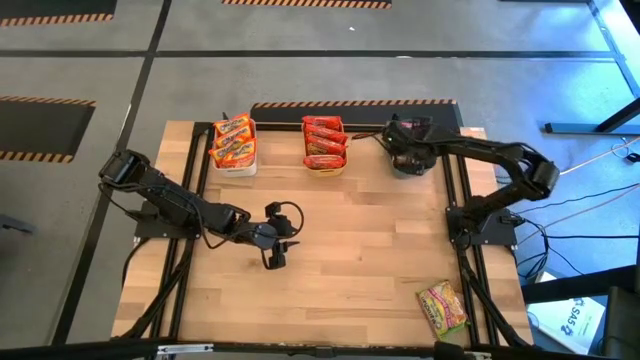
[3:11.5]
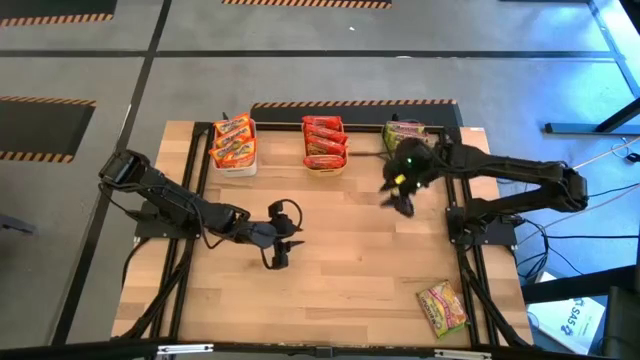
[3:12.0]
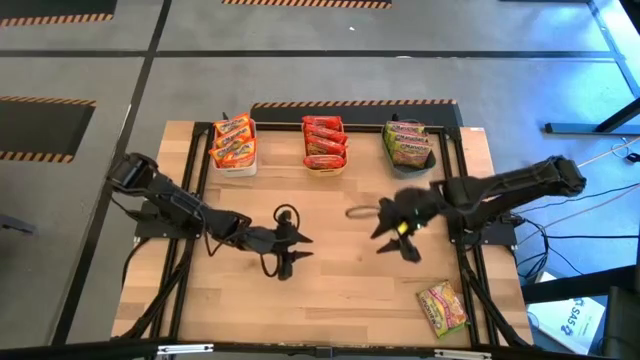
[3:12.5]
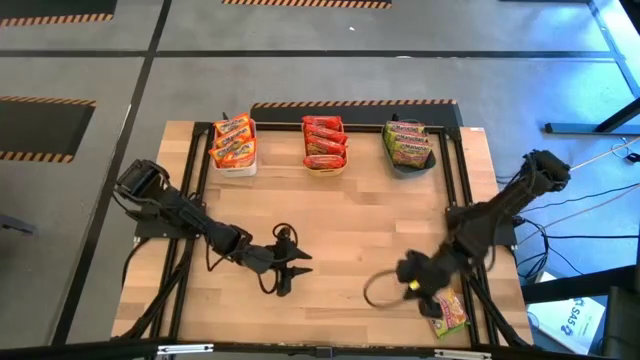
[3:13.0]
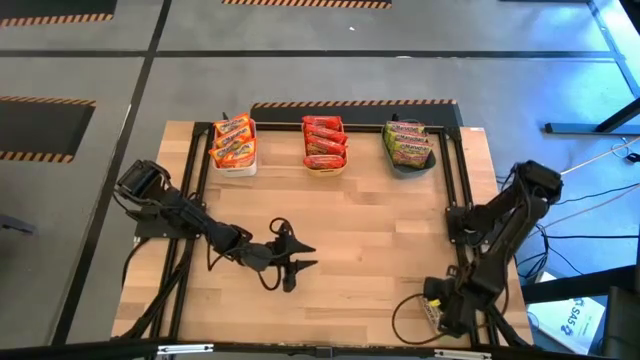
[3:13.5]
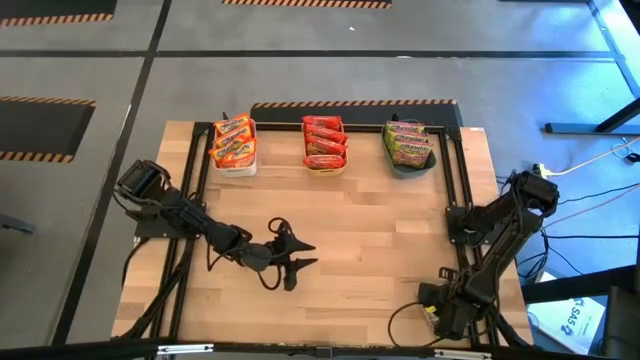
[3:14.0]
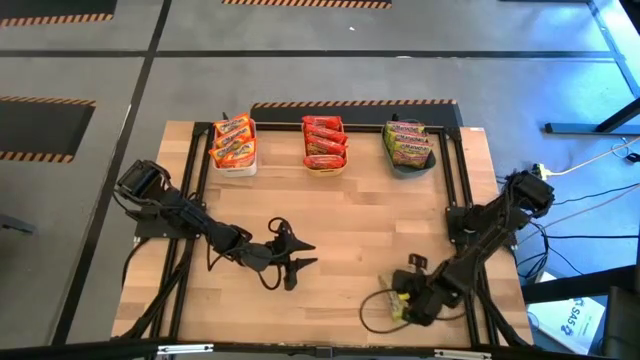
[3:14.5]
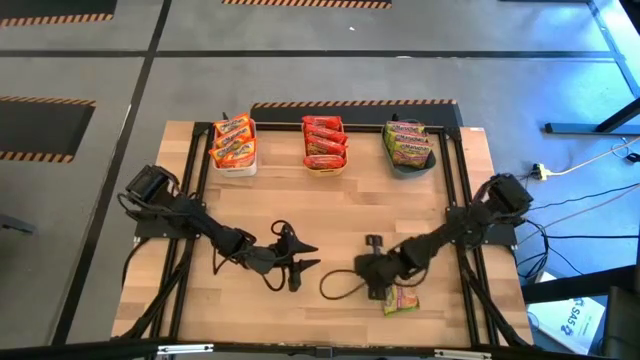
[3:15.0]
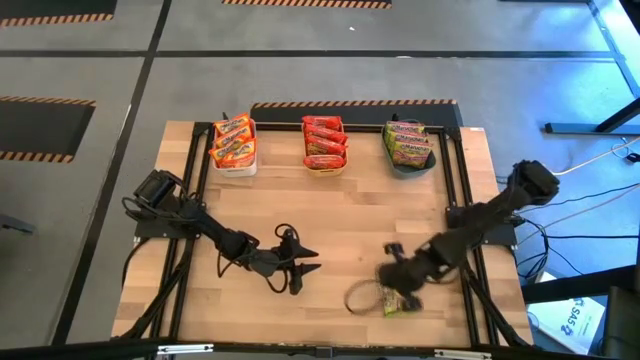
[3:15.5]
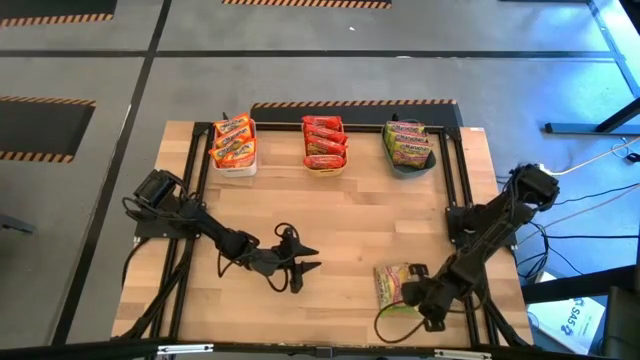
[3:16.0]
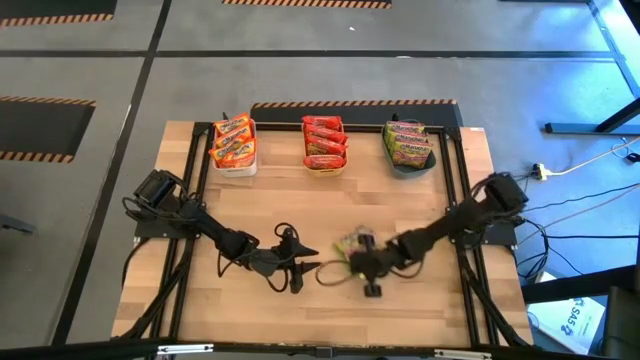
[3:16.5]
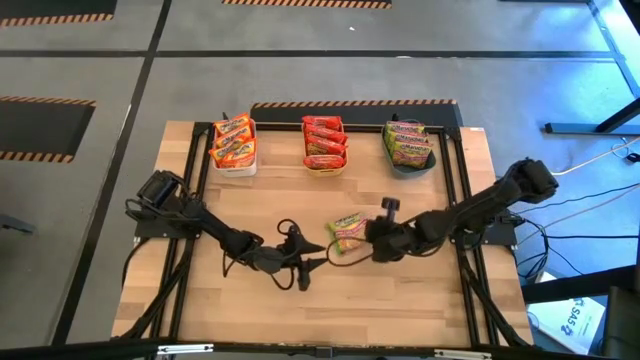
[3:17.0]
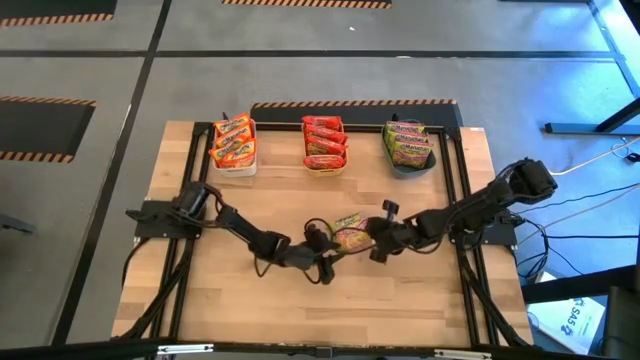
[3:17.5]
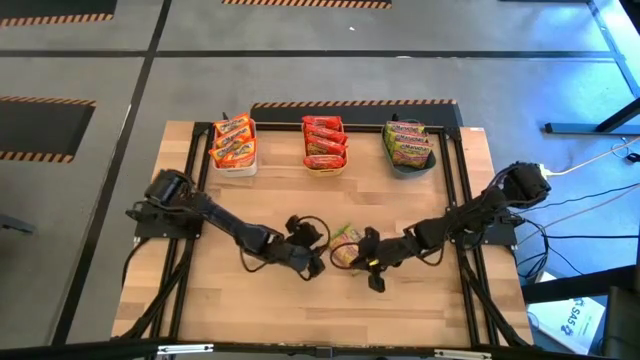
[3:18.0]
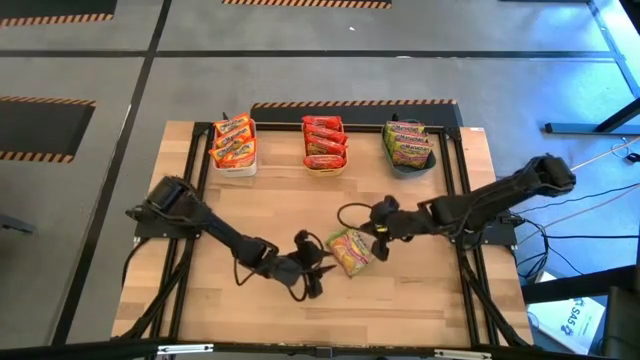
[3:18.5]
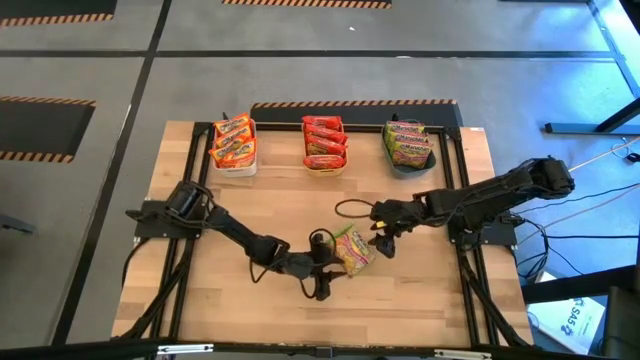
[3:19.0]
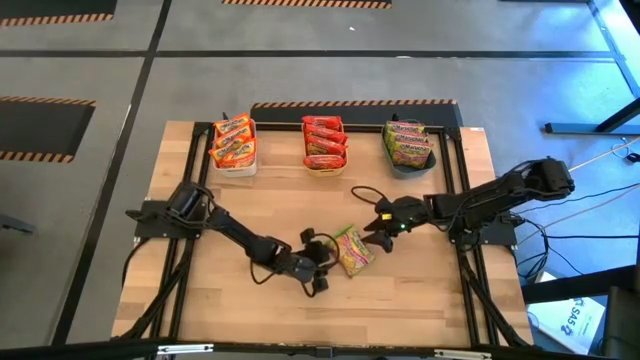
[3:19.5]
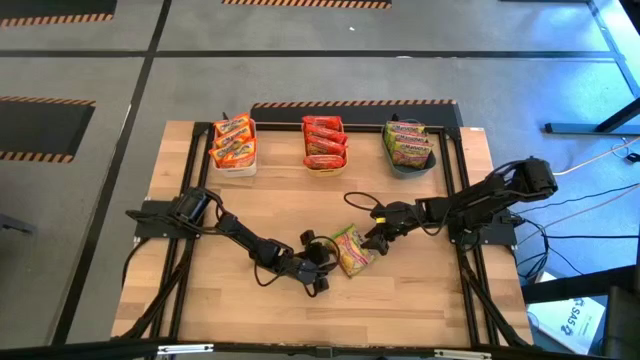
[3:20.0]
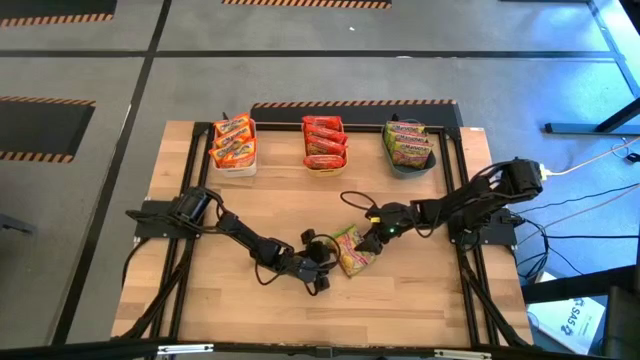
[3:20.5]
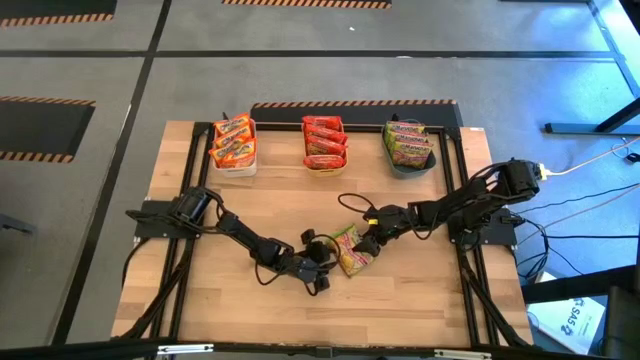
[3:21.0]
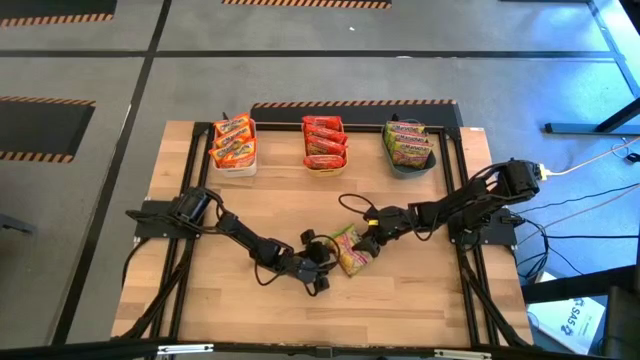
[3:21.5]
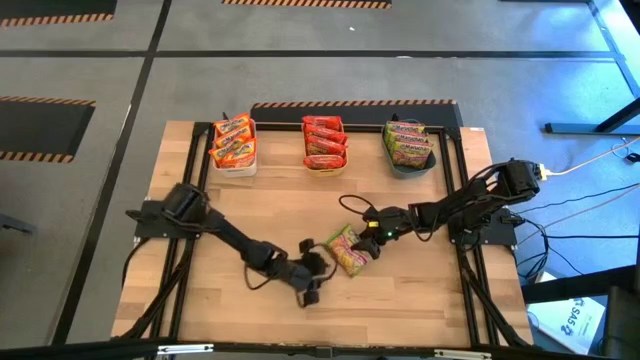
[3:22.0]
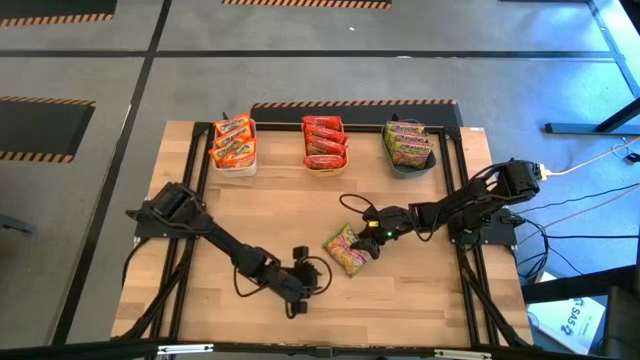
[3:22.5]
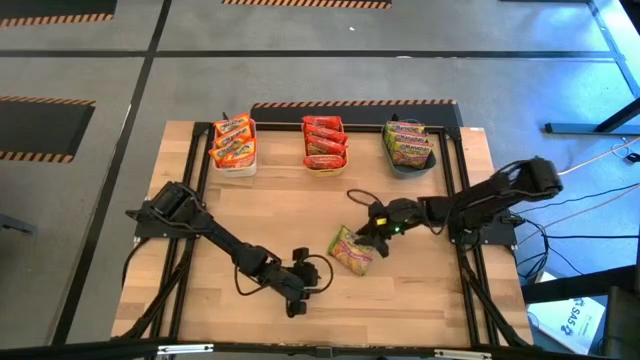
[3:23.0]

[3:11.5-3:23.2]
Task: Sort Maruchan noodles
Put the green noodle pack into the blue bin

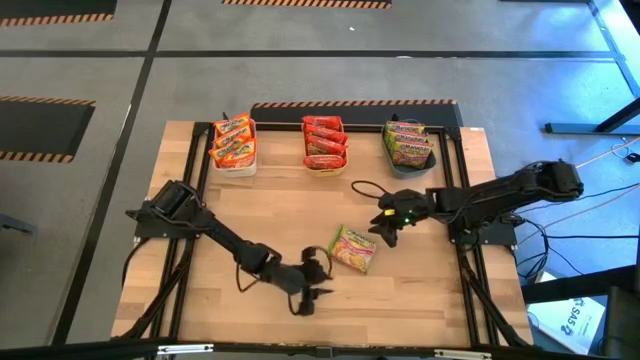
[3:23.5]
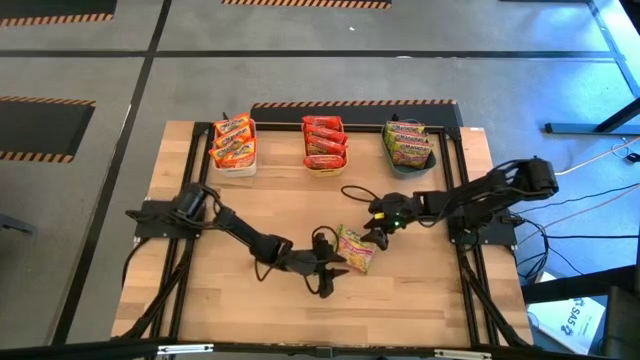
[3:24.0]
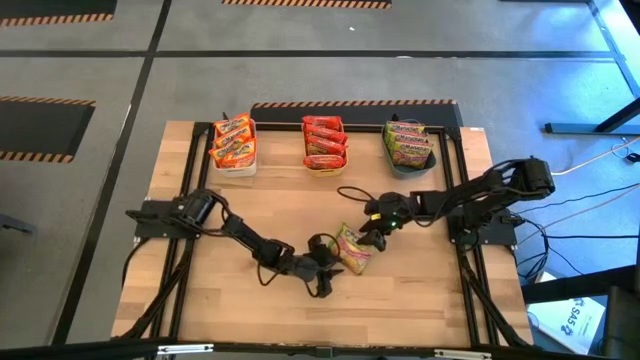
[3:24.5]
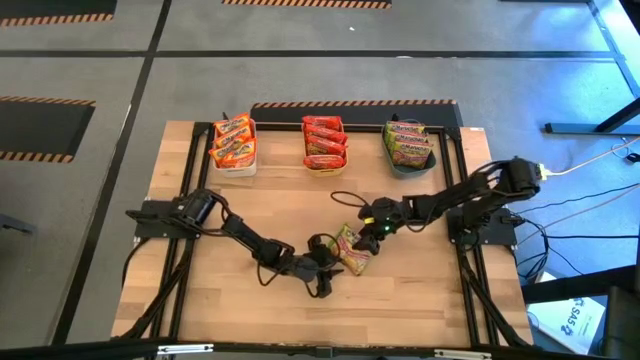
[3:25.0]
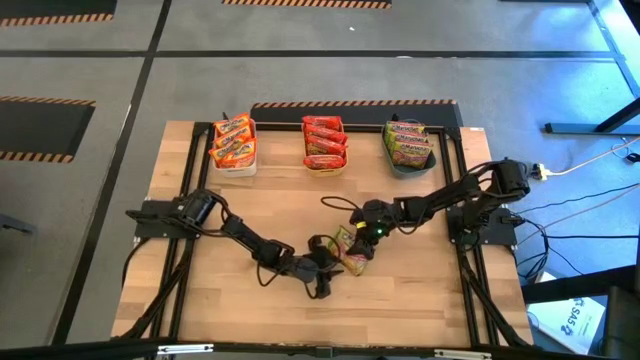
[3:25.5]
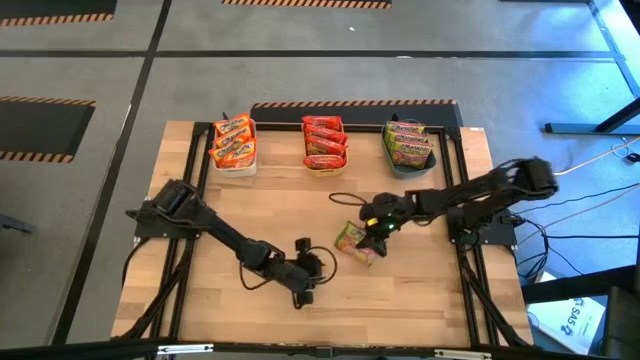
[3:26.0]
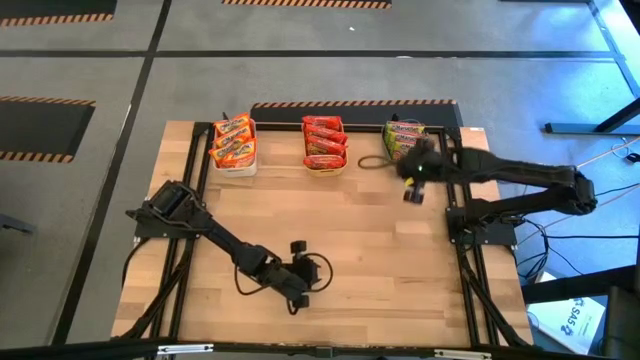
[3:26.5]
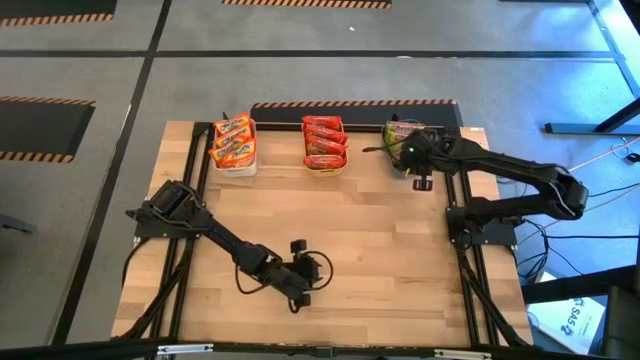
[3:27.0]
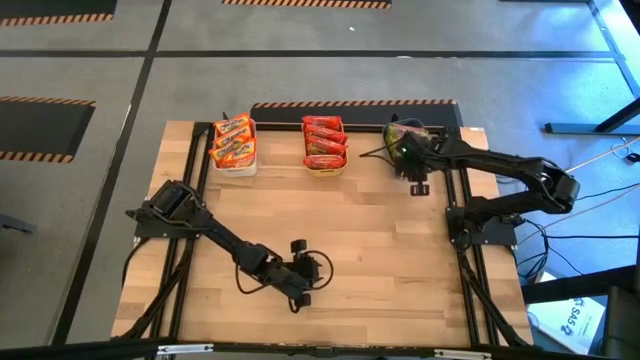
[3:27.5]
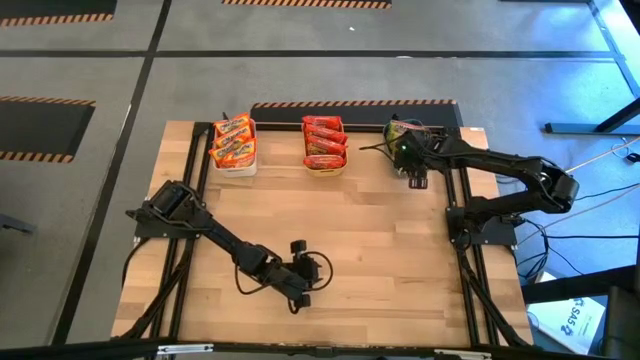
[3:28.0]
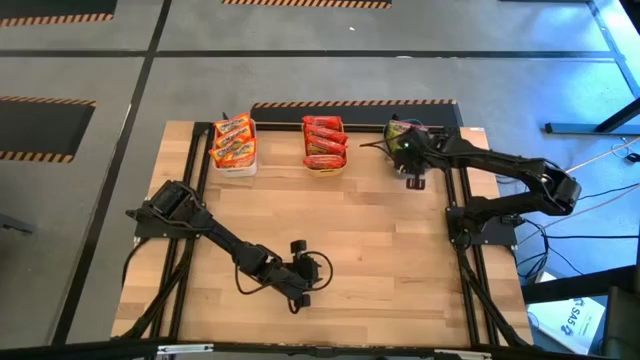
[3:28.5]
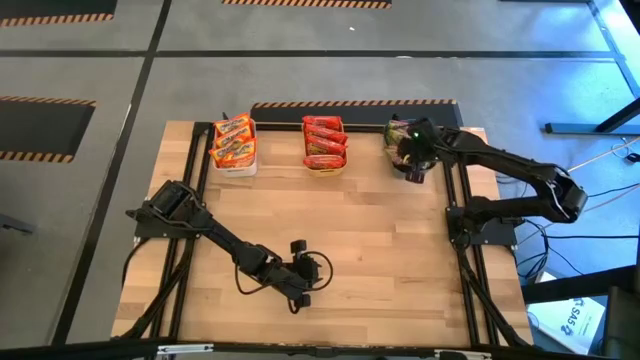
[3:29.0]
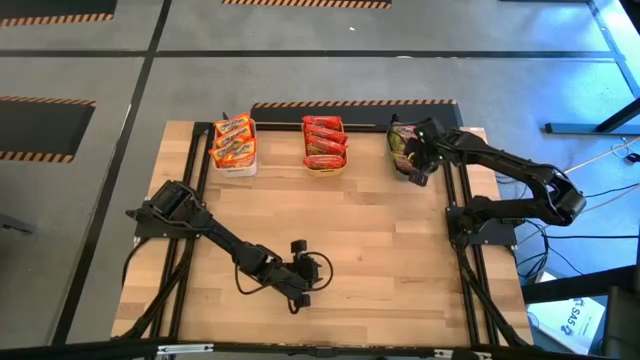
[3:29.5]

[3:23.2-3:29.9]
Put the green noodle pack into the blue bin

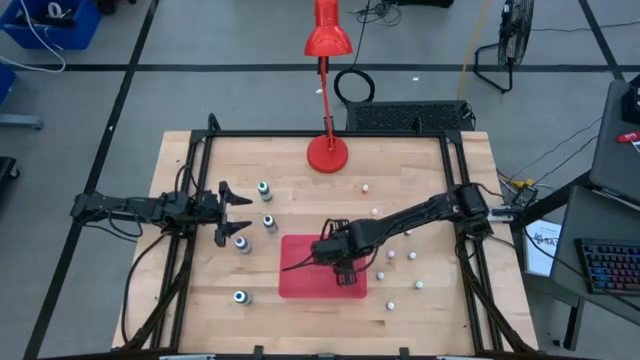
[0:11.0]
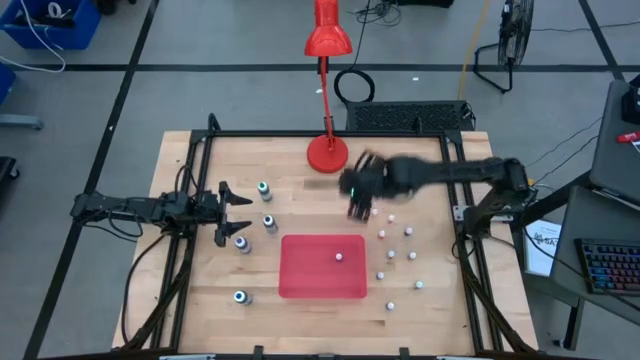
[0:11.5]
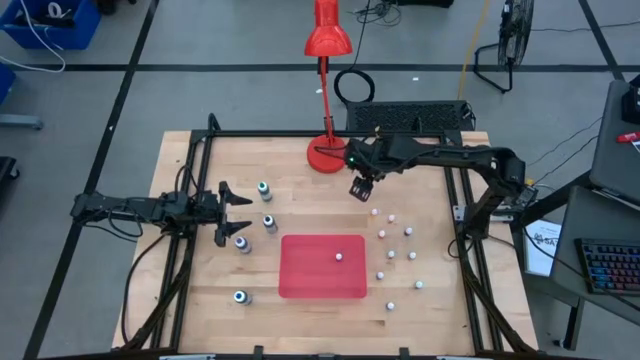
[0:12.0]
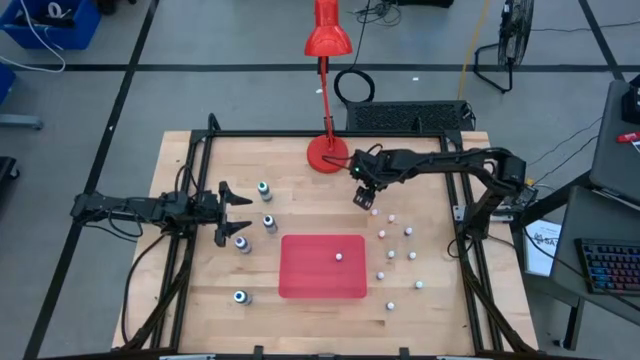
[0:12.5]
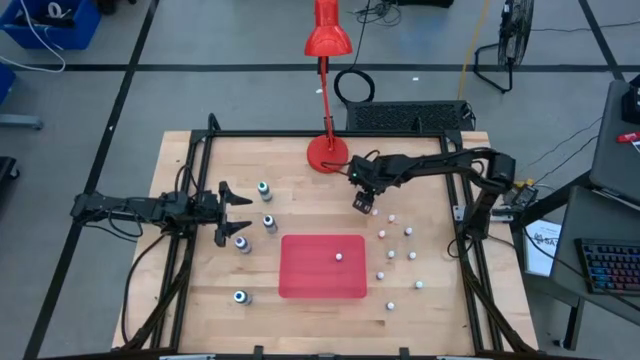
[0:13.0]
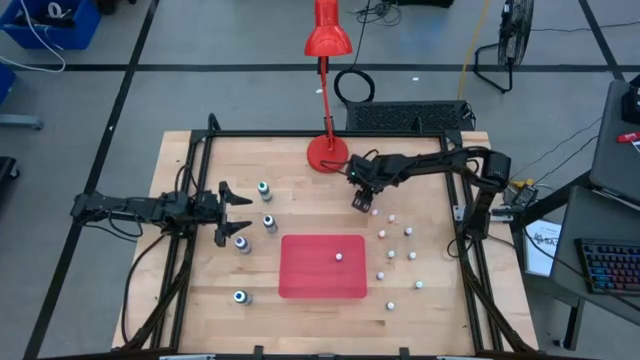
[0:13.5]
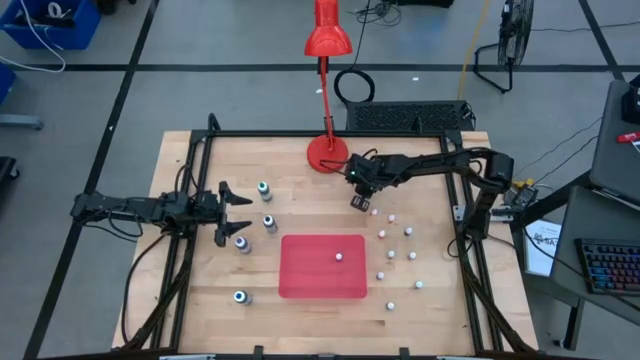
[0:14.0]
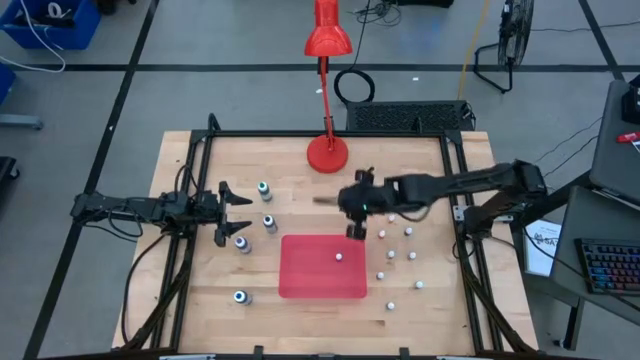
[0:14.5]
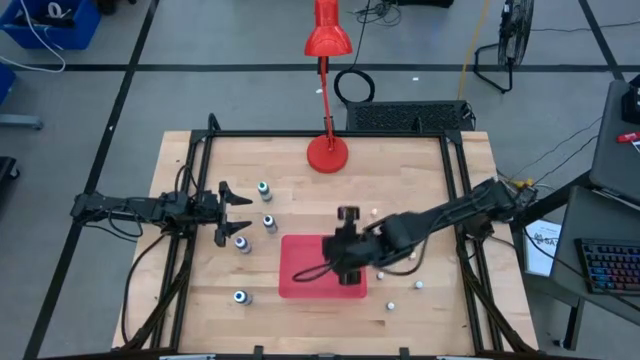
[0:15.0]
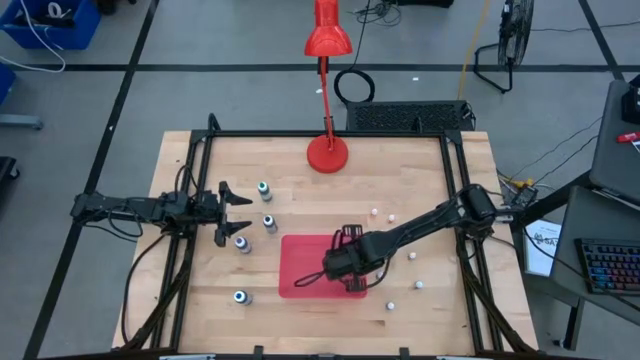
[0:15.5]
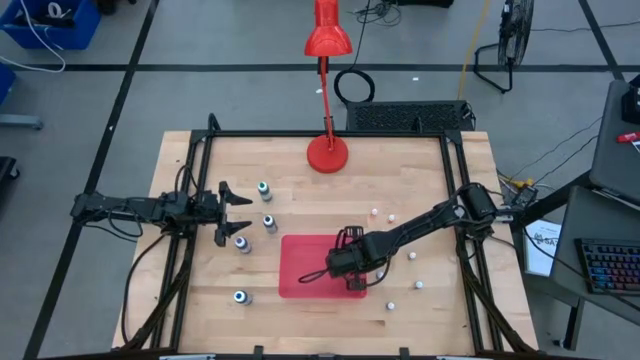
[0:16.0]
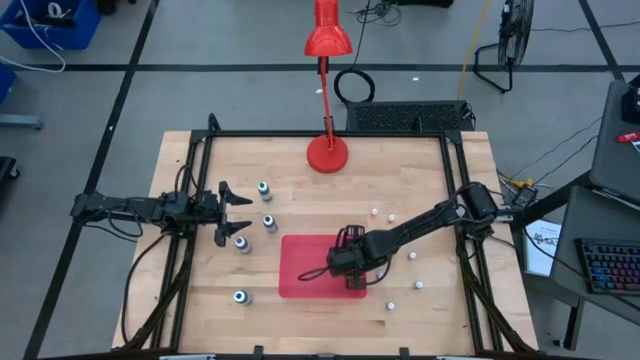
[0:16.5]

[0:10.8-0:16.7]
Task: Pick & Place food coloring
Put the small yellow food coloring bottle into the pink container
